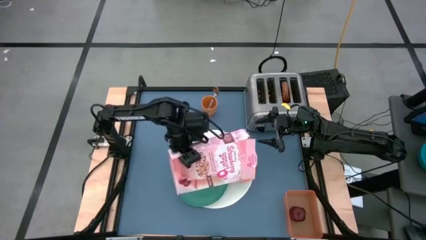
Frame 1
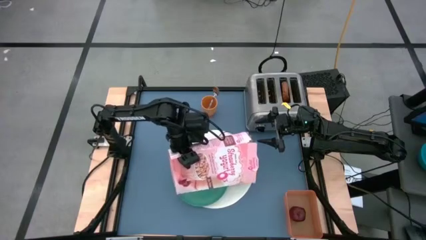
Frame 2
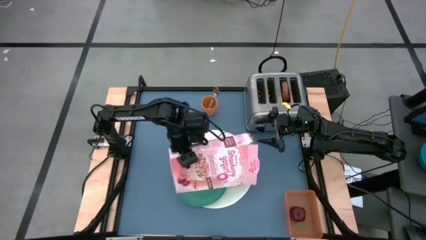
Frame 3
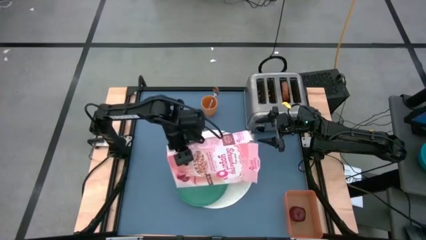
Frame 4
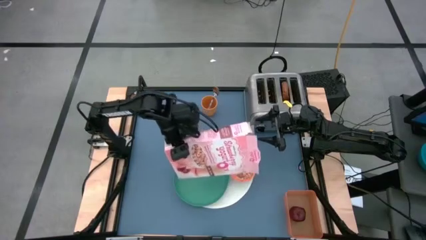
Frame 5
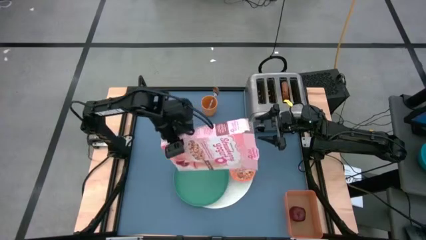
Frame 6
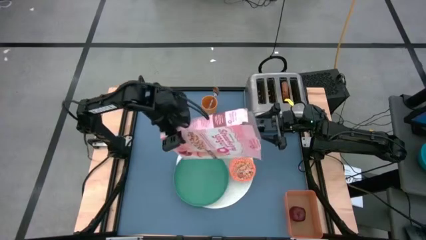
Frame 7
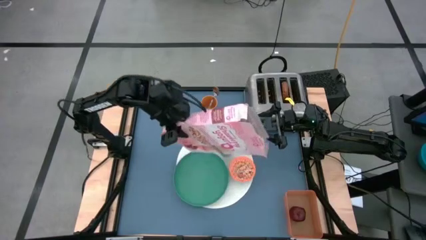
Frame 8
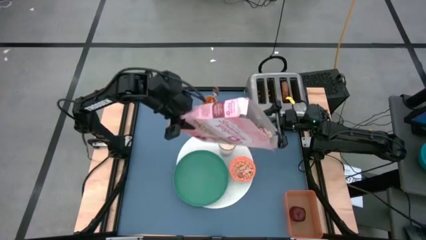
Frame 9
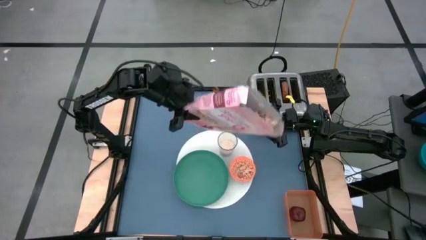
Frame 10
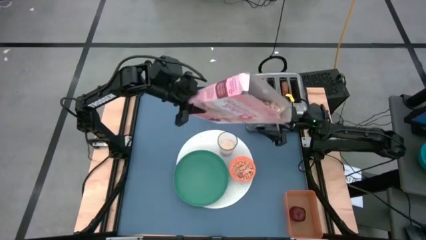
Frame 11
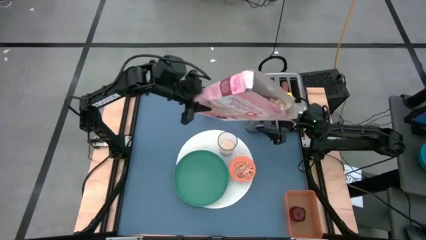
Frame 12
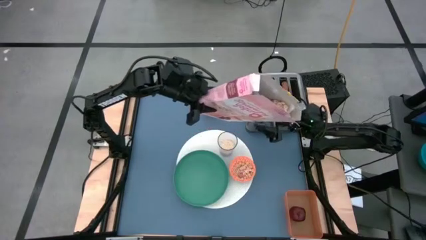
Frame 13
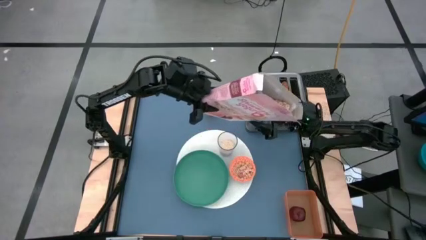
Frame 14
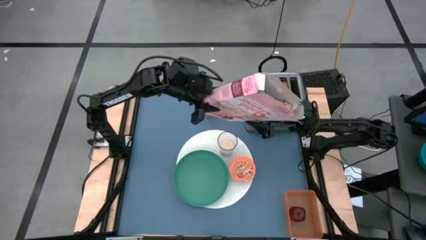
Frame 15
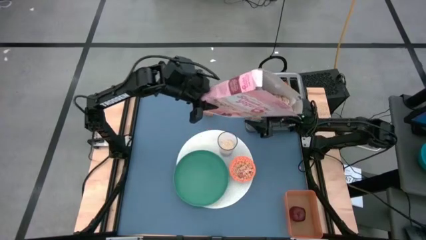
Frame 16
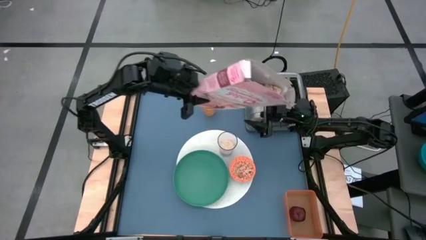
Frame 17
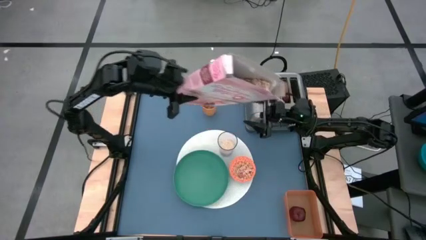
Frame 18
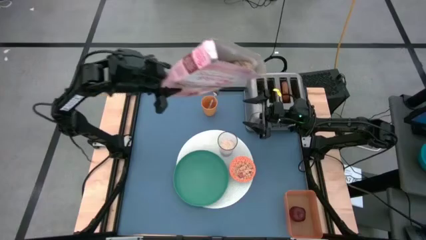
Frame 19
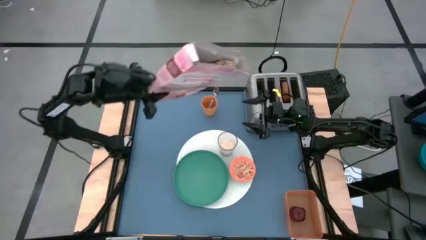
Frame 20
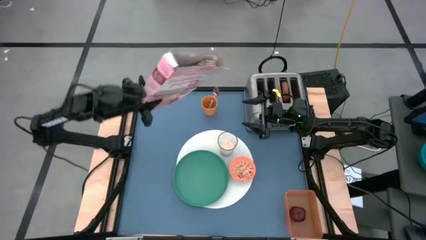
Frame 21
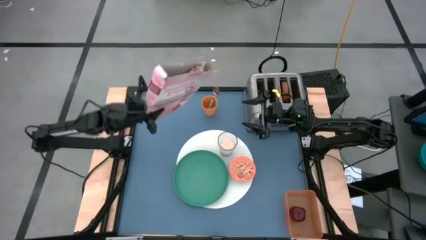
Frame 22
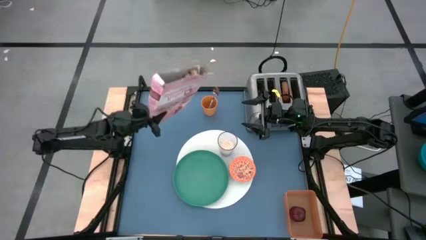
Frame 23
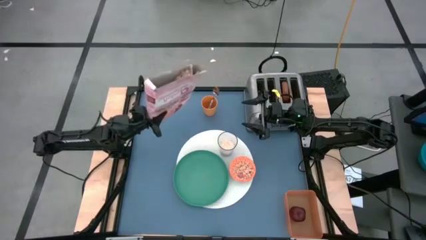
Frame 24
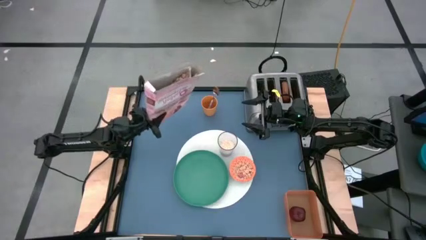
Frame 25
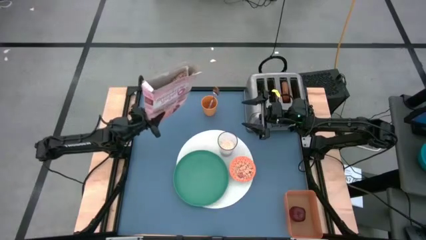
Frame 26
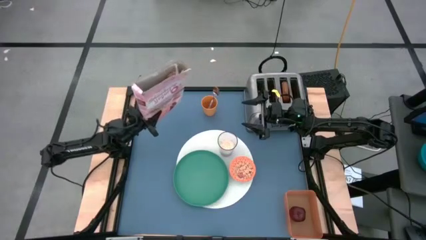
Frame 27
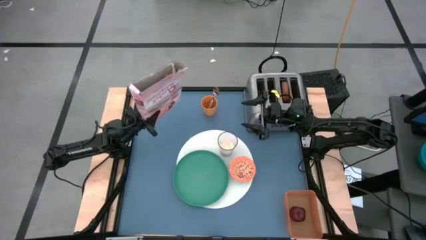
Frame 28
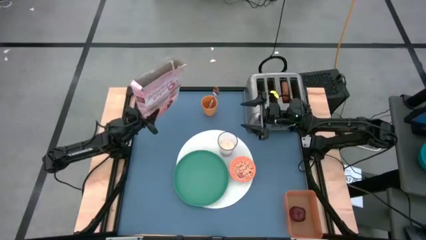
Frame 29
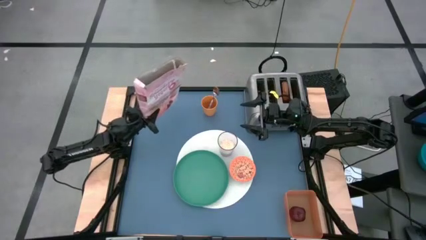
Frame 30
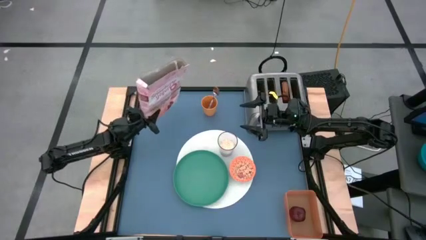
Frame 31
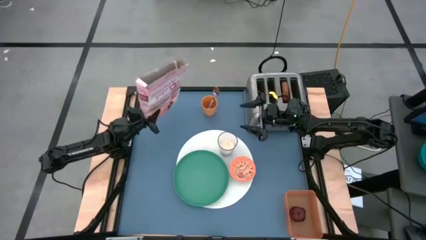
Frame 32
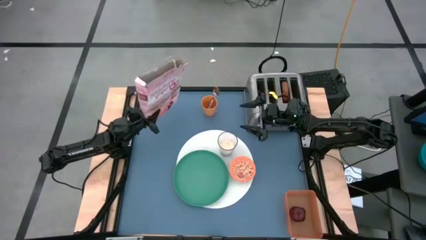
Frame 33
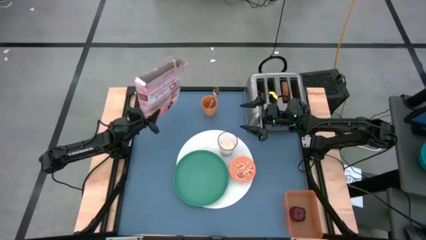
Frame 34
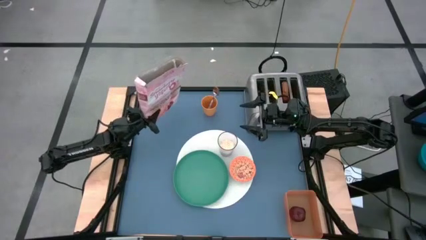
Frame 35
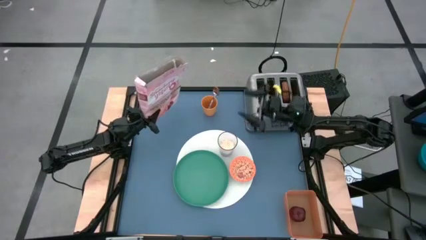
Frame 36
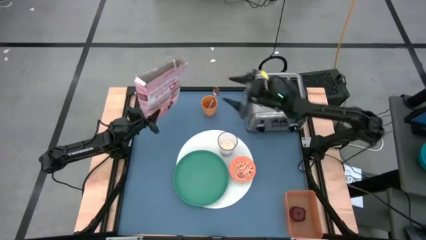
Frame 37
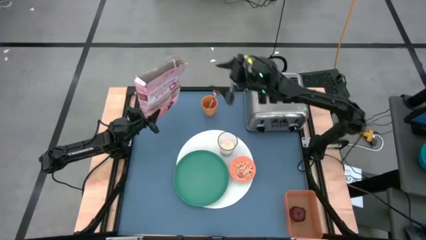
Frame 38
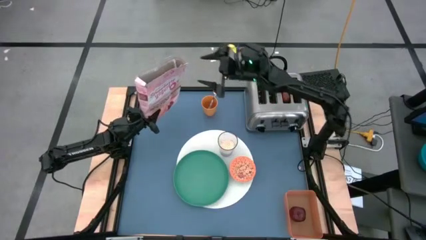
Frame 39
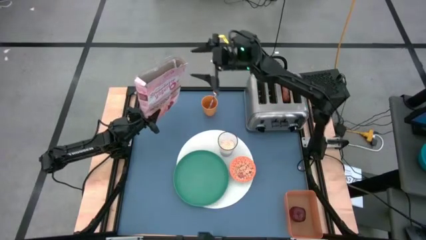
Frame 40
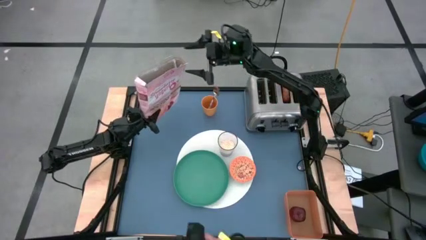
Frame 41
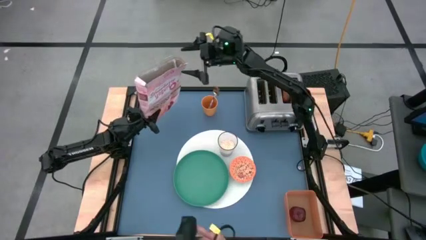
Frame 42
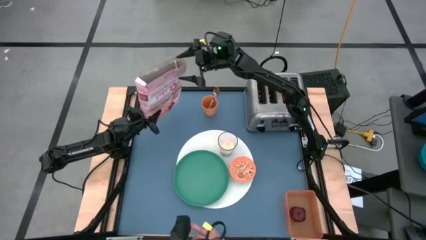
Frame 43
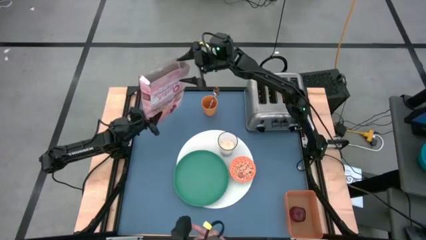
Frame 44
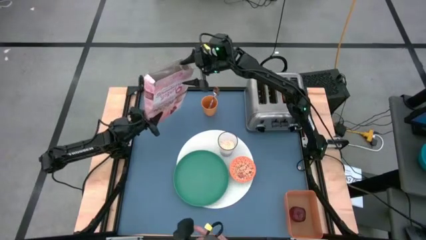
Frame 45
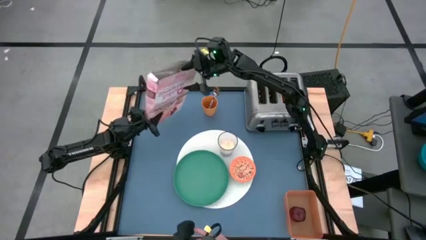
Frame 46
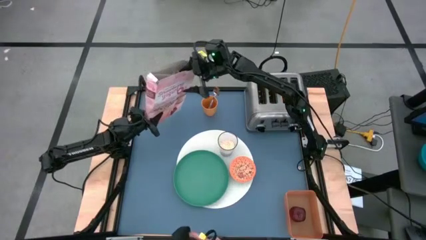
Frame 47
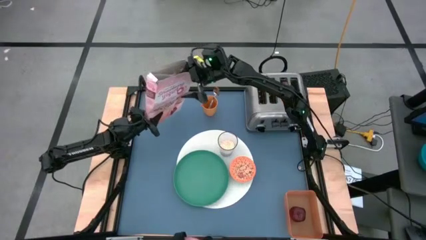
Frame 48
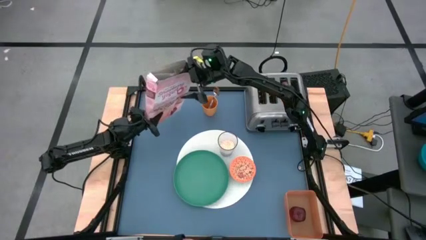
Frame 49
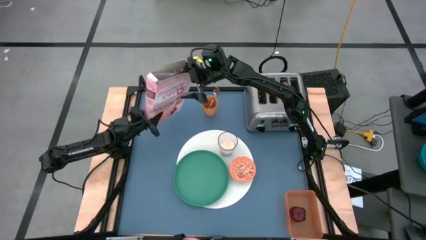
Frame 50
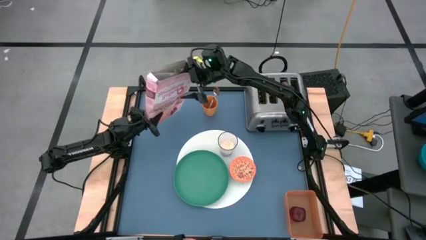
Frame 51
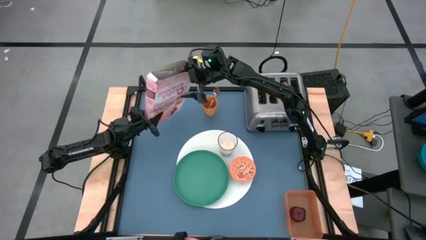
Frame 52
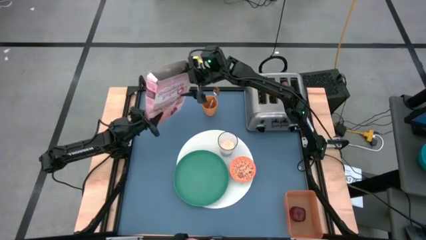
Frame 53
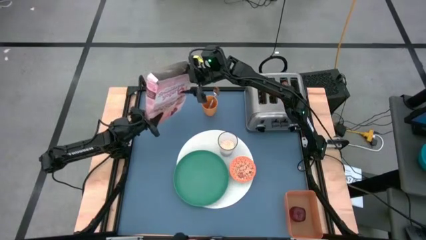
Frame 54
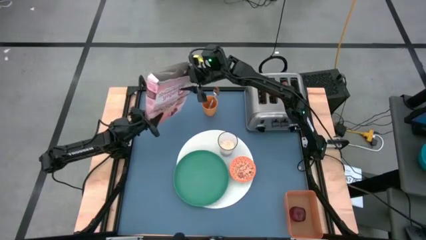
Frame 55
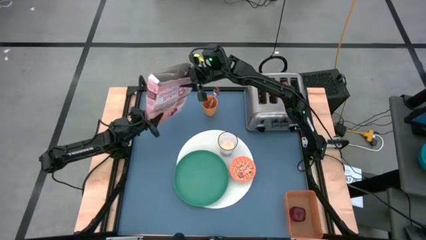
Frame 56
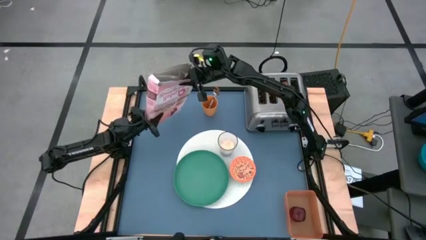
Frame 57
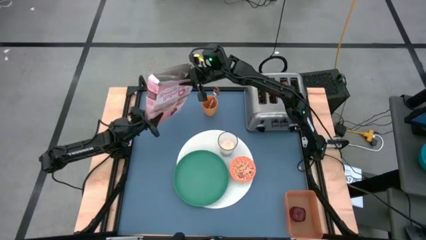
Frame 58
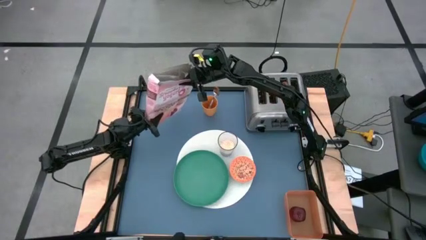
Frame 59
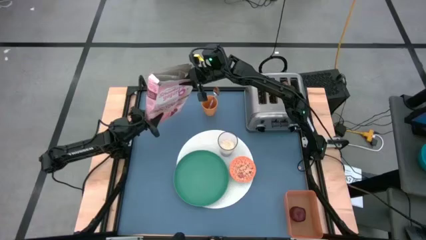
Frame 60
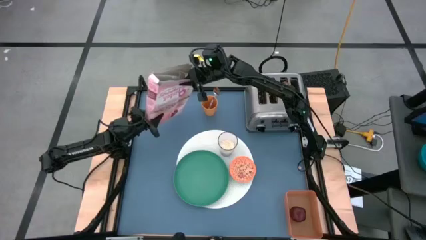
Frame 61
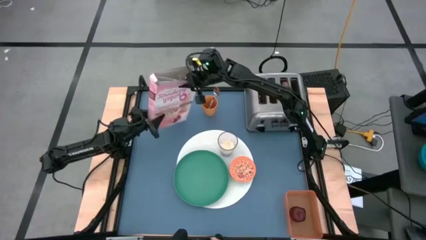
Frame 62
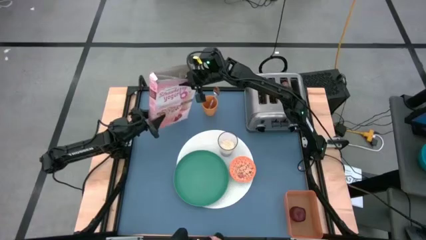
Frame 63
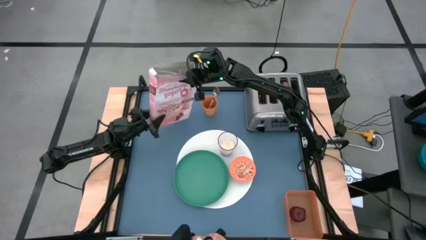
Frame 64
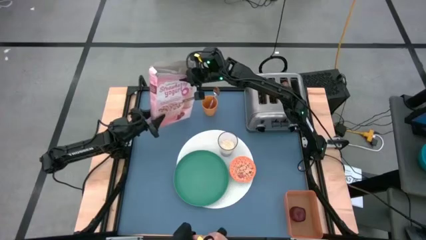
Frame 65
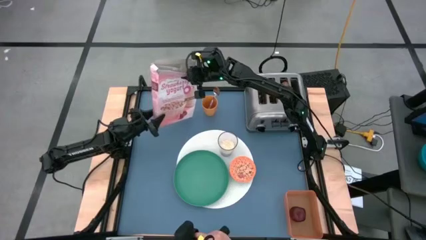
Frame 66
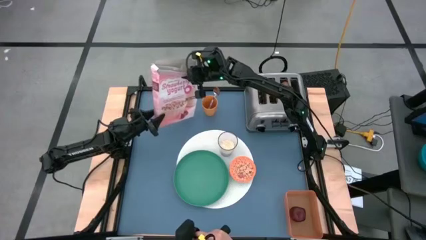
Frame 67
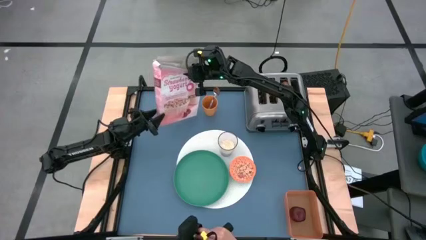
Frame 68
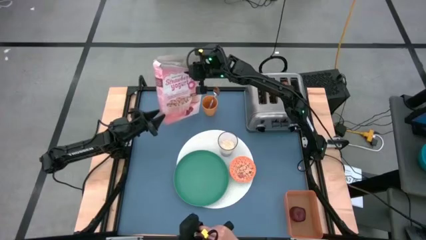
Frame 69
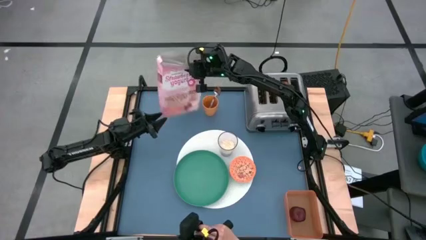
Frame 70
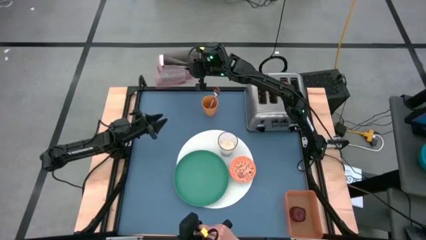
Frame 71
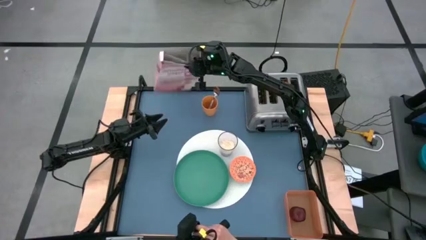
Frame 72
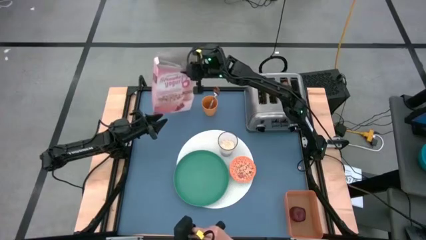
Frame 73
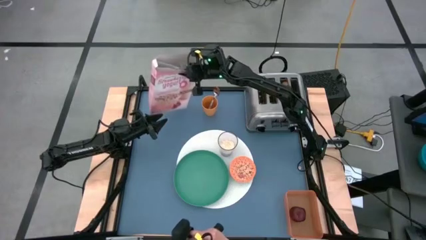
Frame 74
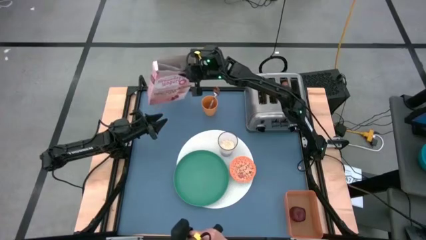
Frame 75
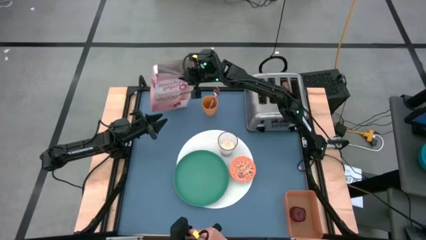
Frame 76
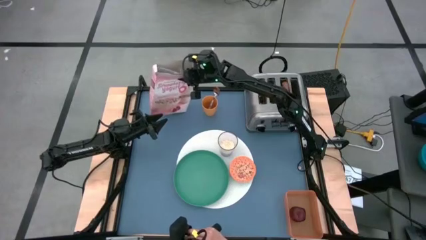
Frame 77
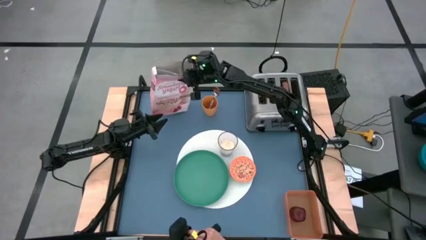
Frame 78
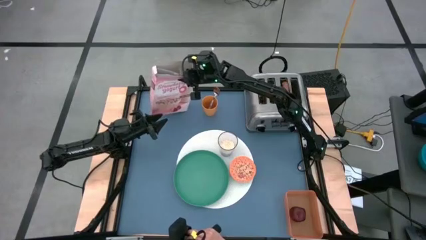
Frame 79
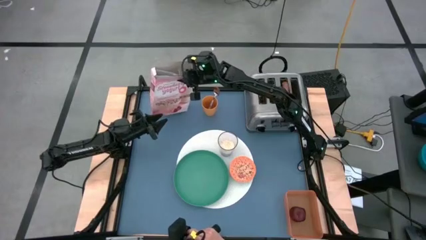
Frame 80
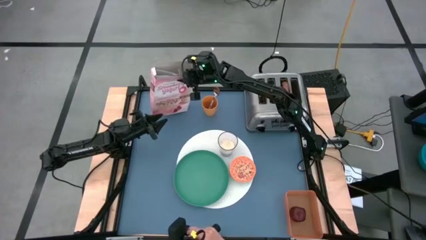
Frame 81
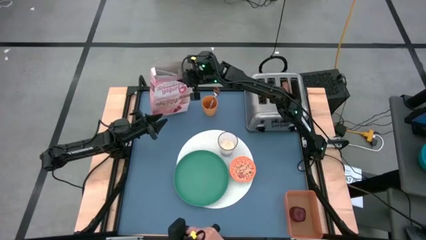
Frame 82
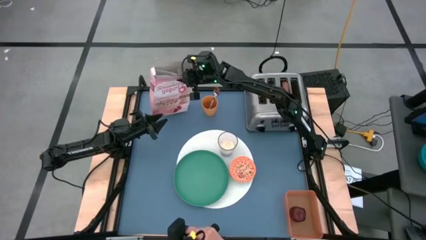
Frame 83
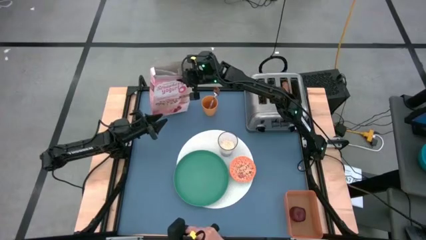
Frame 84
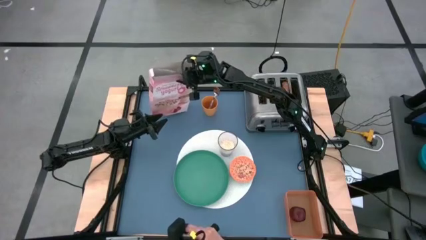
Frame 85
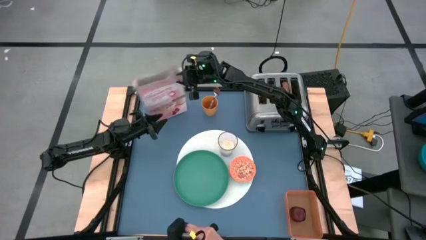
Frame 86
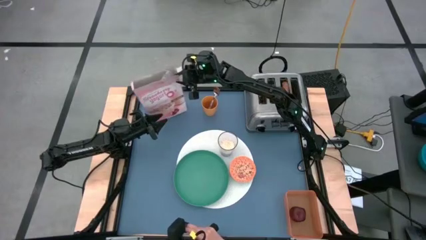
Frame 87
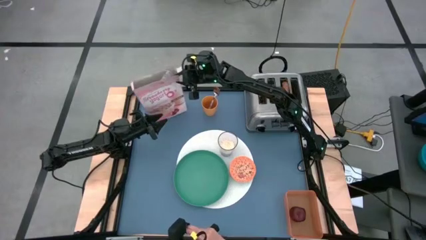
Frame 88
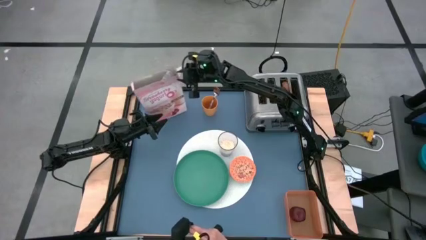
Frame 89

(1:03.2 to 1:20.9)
Task: Arrange a breakfast setting
Pour the cereal into the orange bowl
